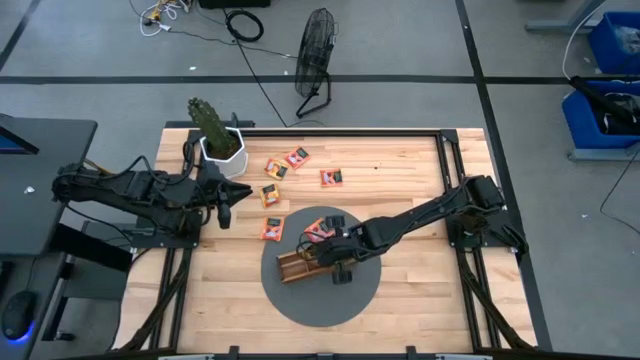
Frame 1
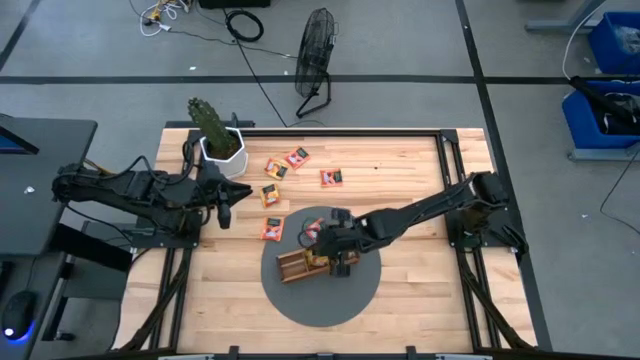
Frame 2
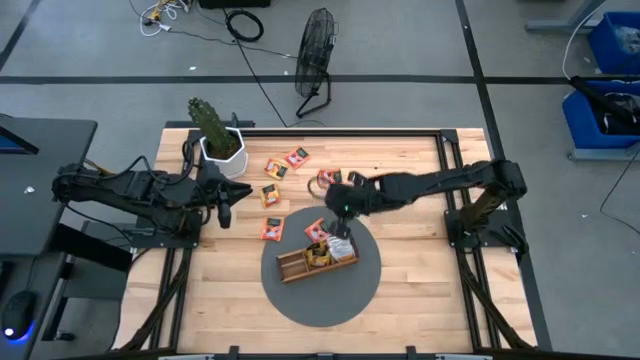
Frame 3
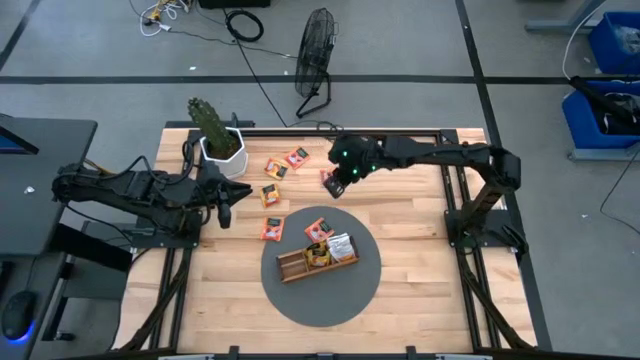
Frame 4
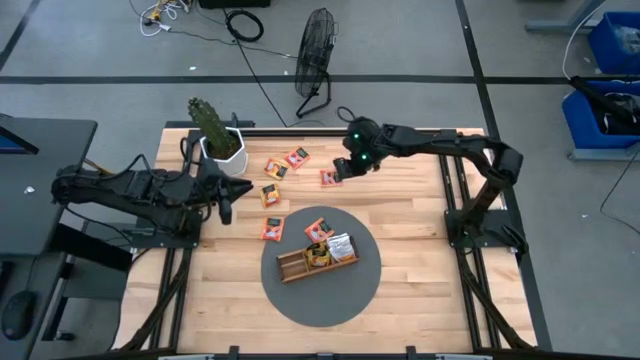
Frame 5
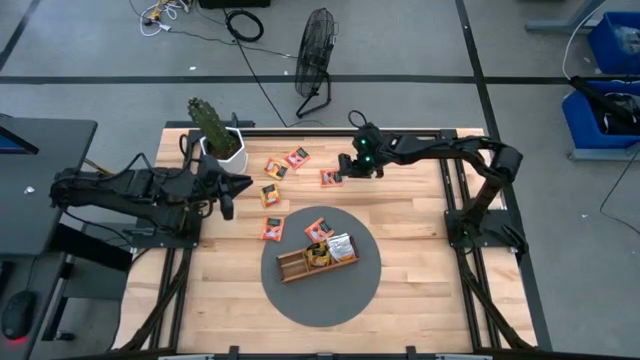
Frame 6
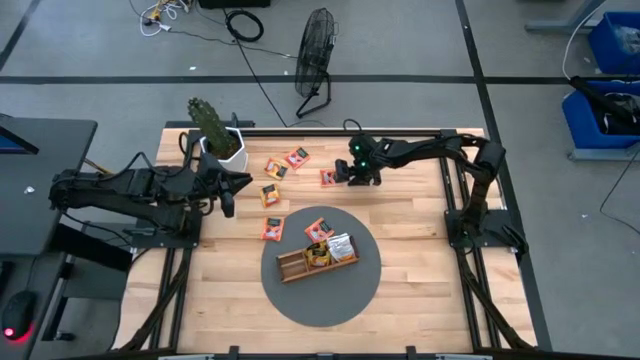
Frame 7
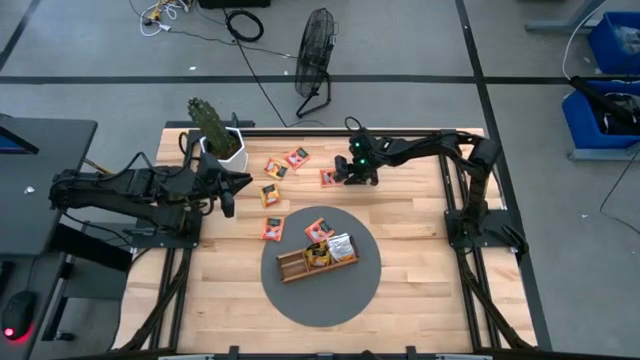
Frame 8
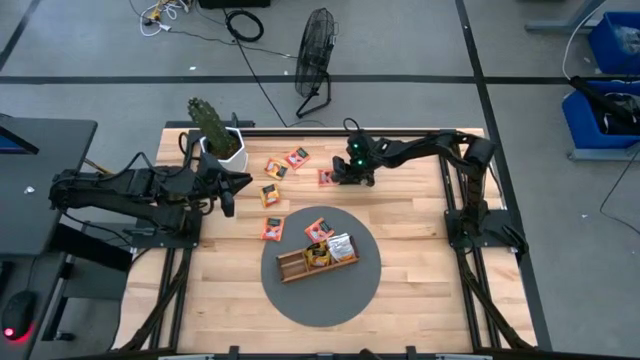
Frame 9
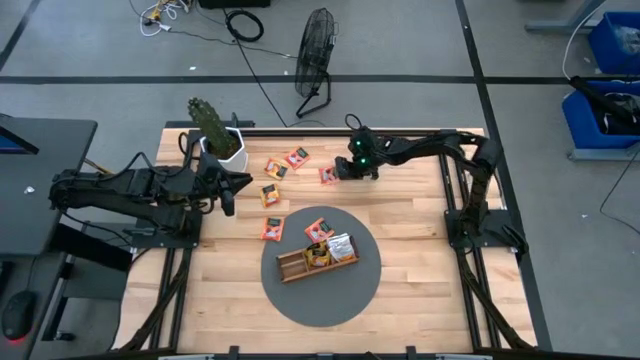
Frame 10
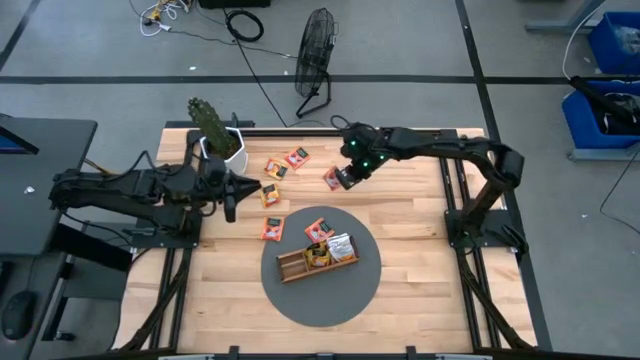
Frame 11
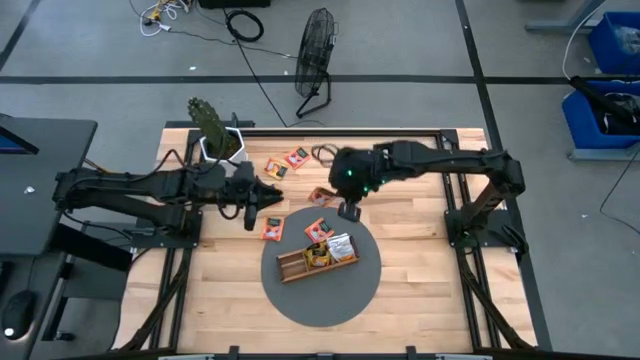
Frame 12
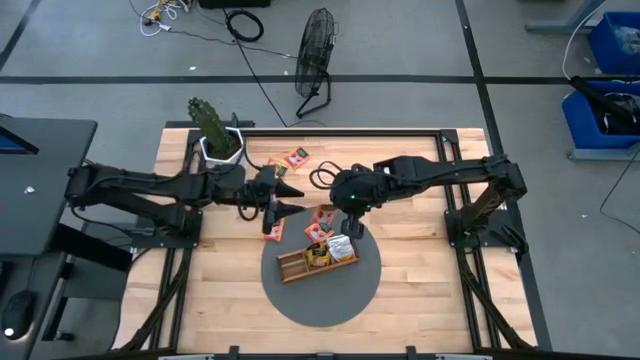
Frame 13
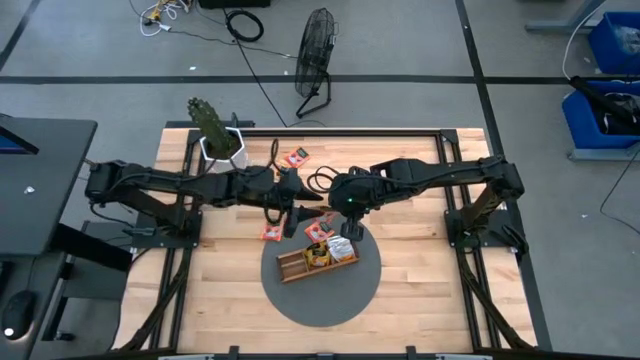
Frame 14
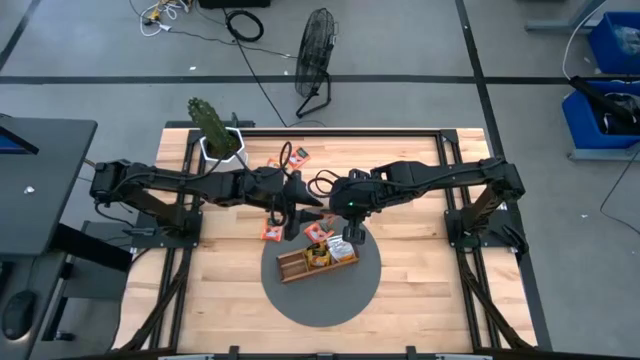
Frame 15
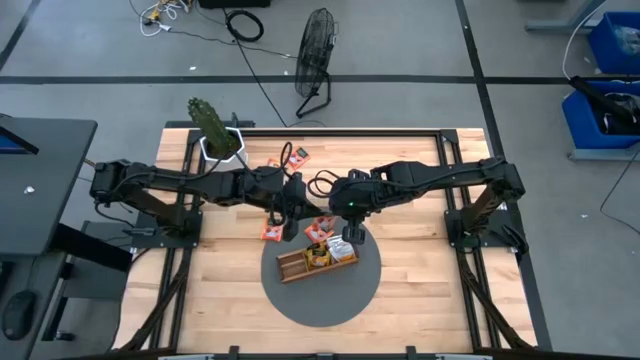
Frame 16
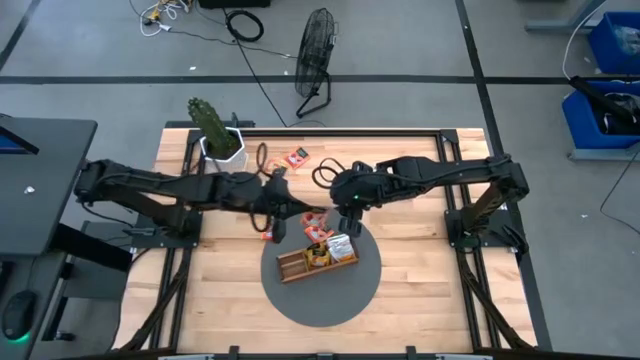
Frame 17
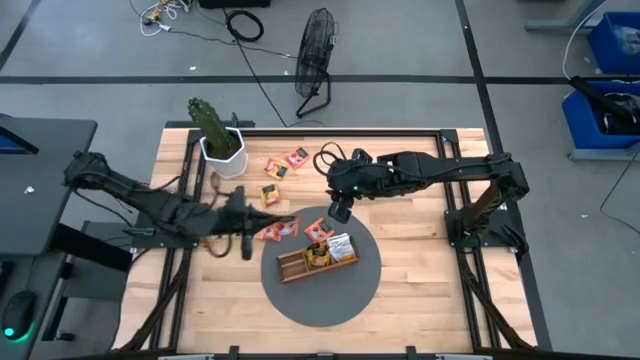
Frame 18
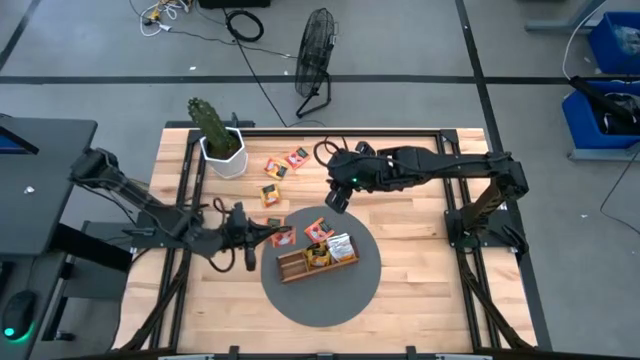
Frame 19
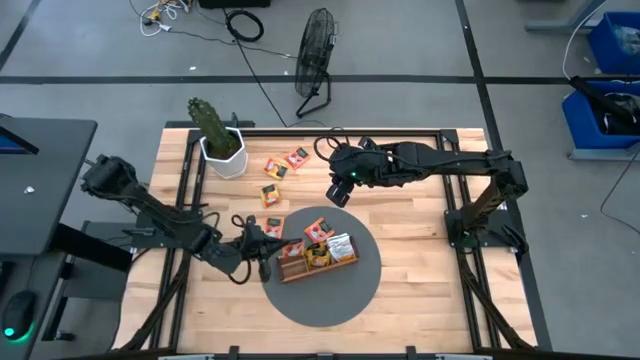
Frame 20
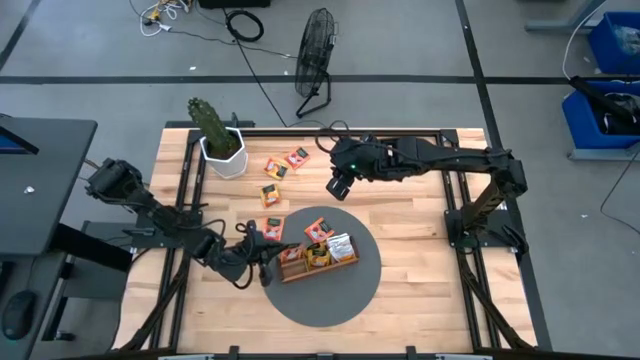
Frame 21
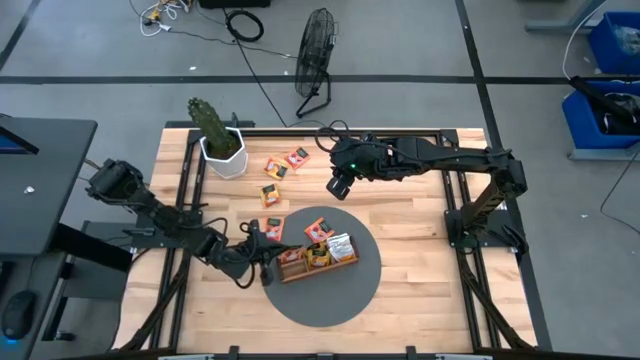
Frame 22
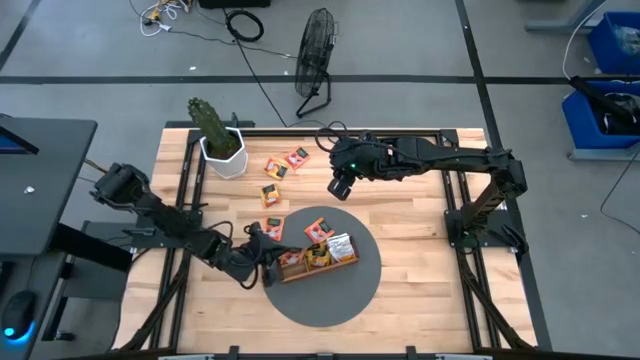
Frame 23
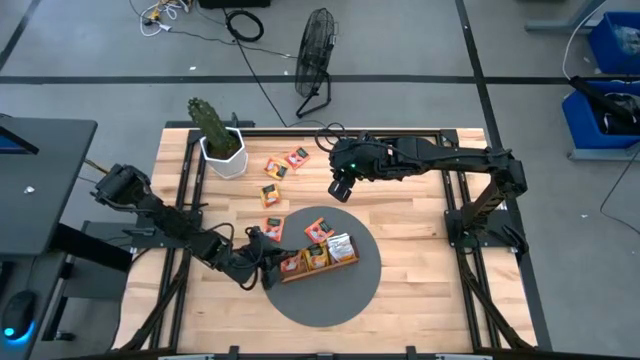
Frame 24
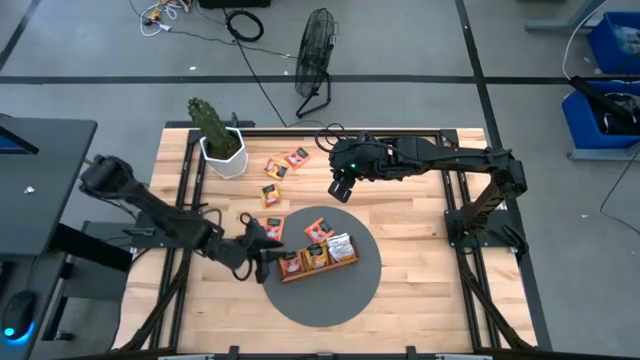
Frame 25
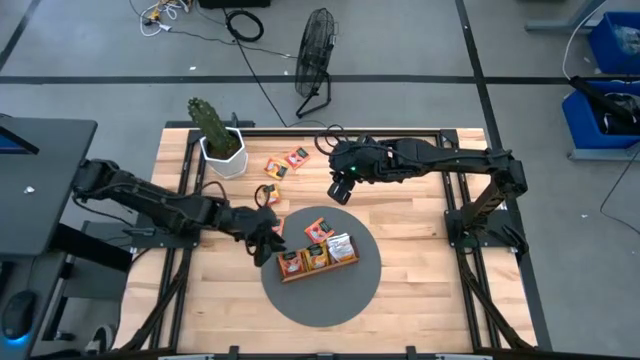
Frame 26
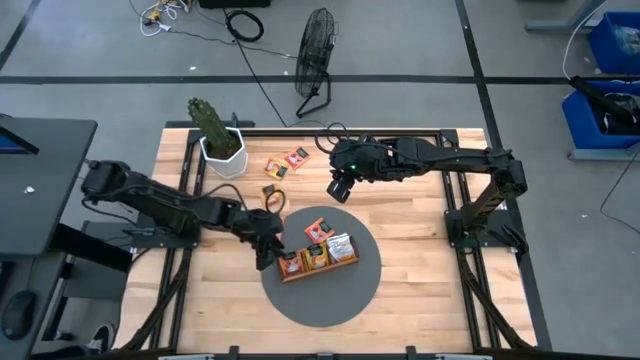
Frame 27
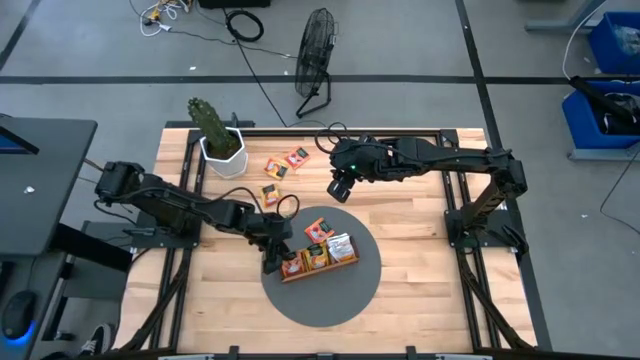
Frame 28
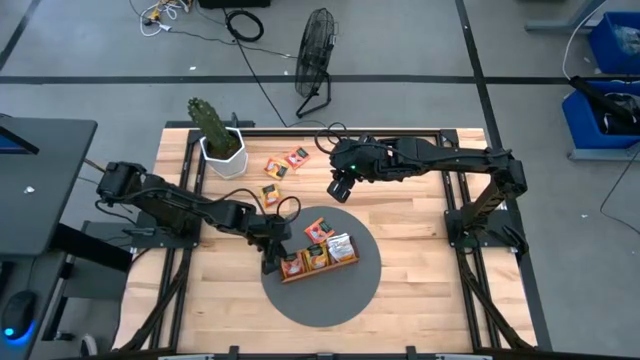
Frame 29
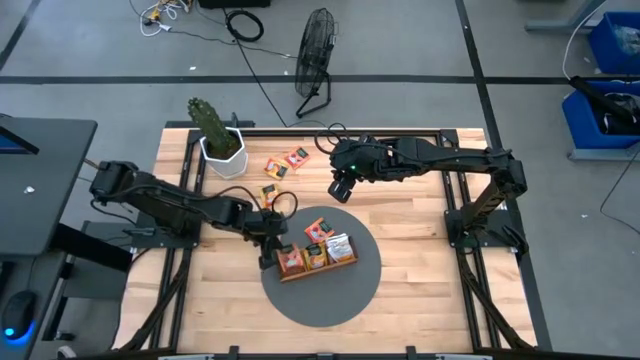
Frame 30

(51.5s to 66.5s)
Task: Pick & Place Tea
Put the orange tea bag into the left section of the wooden organizer

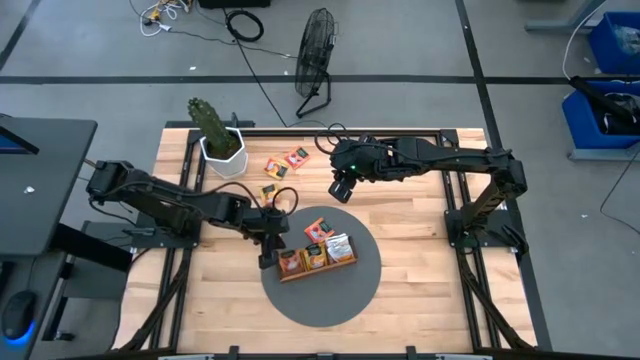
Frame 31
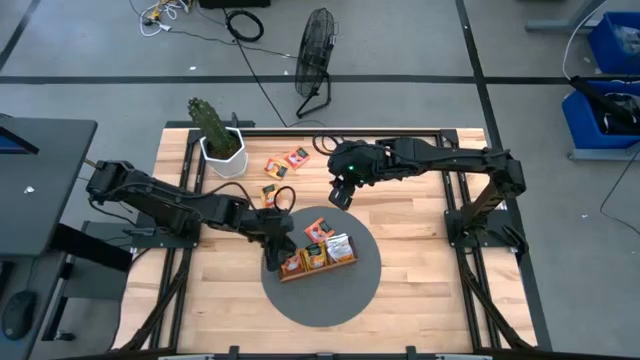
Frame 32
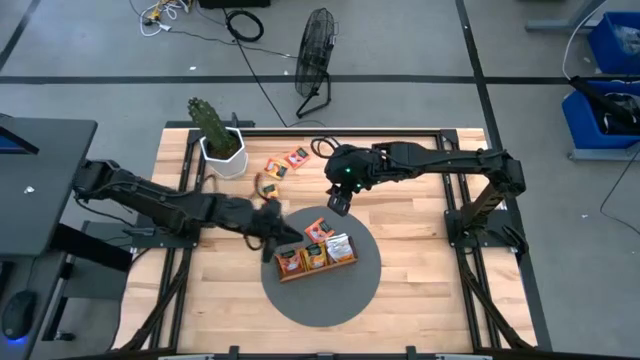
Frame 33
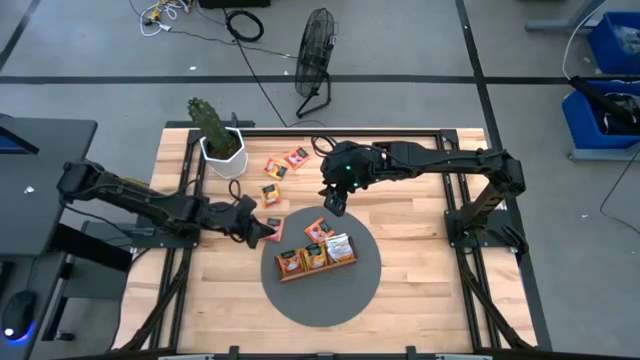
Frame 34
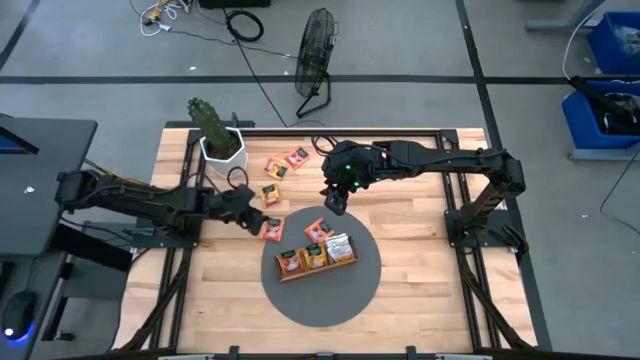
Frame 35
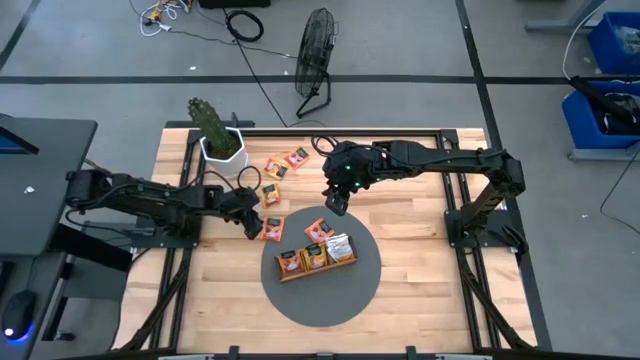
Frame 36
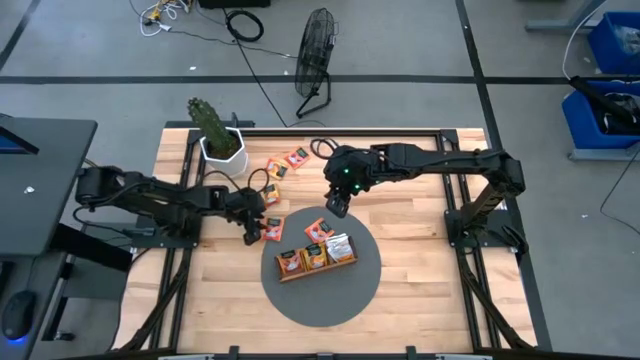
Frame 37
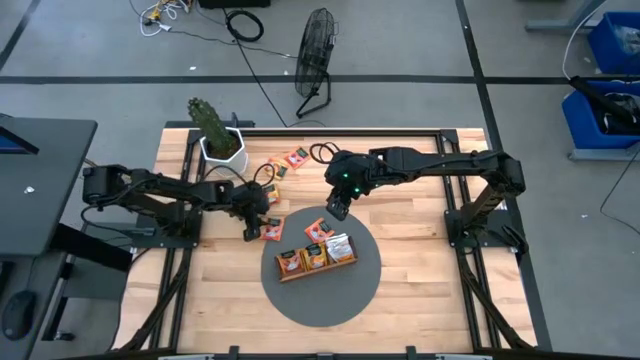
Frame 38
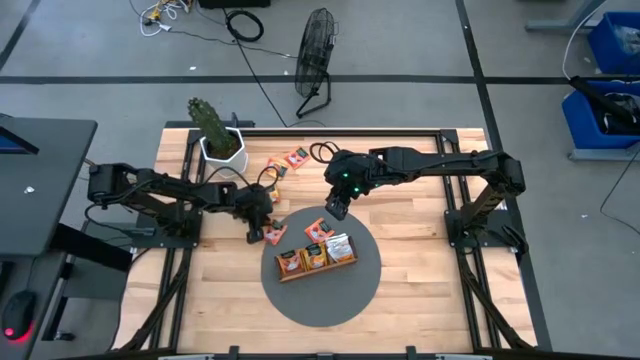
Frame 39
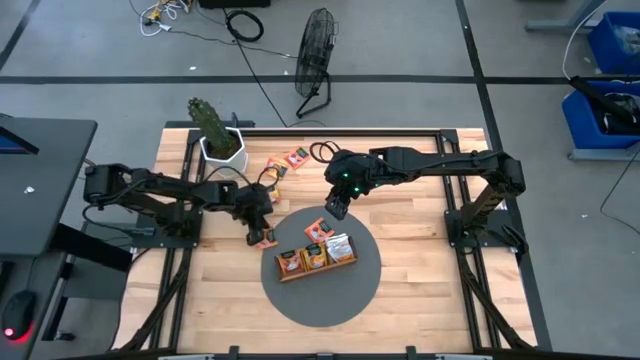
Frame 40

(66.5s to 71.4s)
Put the bottom left orange tea bag into the left section of the wooden organizer
